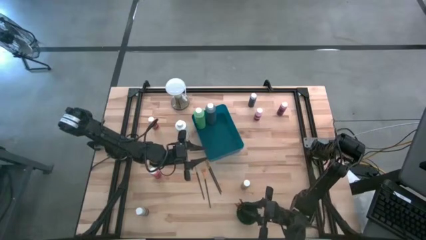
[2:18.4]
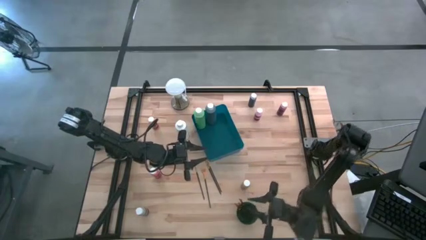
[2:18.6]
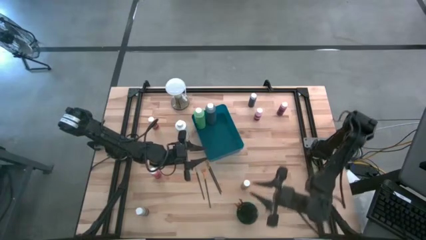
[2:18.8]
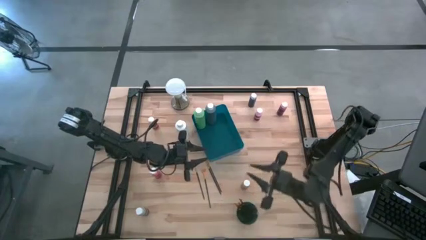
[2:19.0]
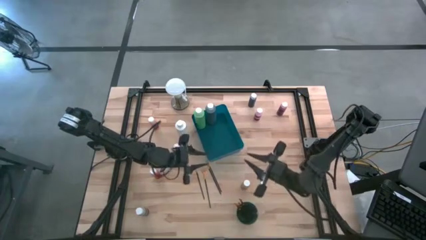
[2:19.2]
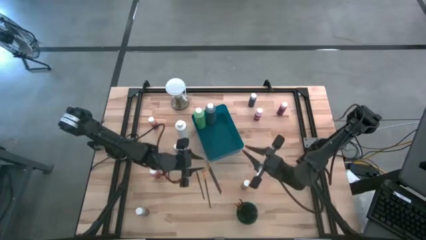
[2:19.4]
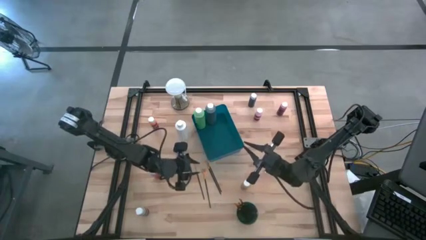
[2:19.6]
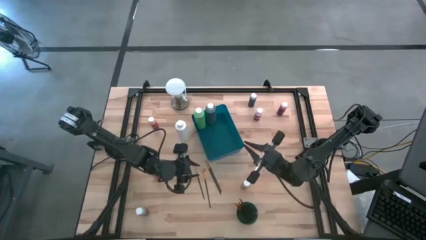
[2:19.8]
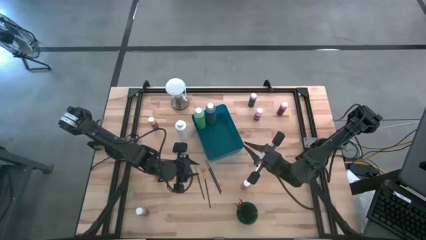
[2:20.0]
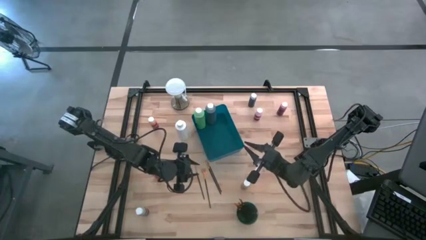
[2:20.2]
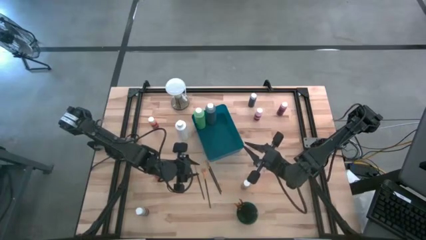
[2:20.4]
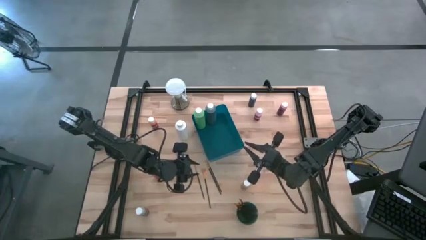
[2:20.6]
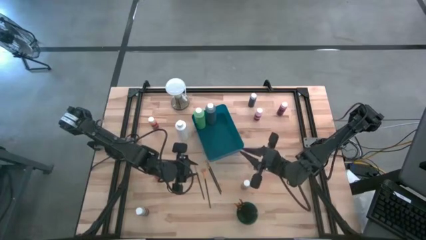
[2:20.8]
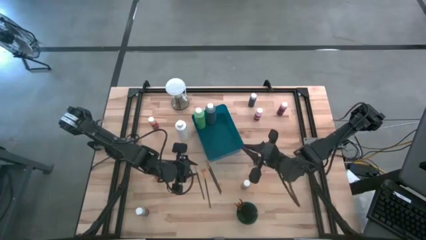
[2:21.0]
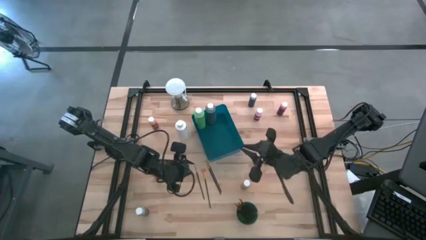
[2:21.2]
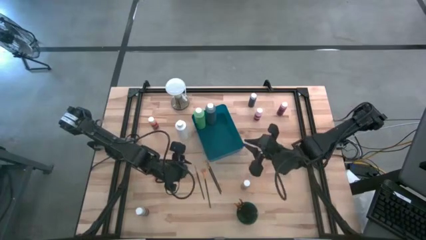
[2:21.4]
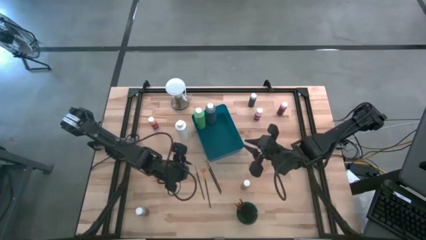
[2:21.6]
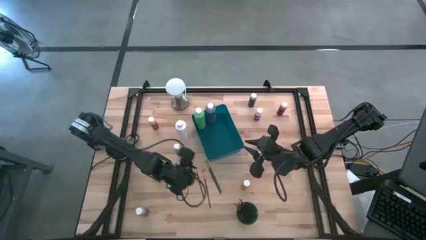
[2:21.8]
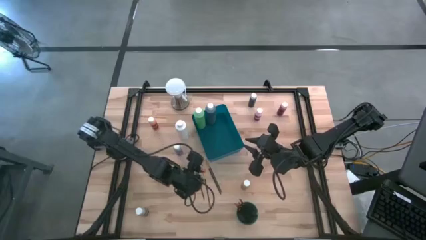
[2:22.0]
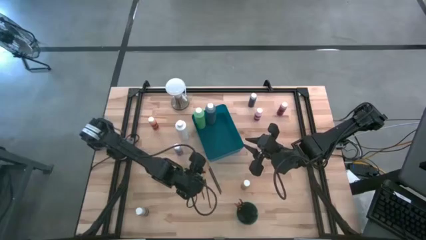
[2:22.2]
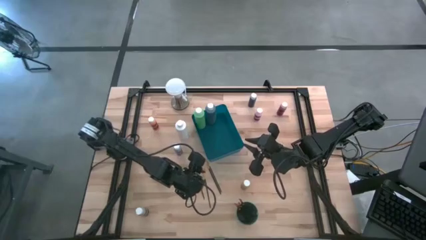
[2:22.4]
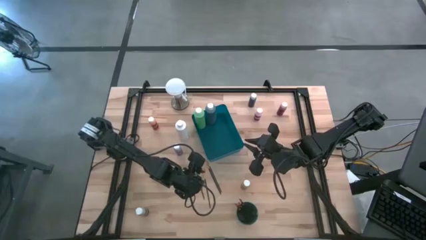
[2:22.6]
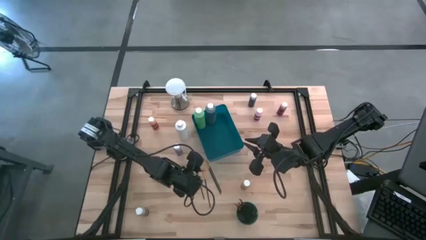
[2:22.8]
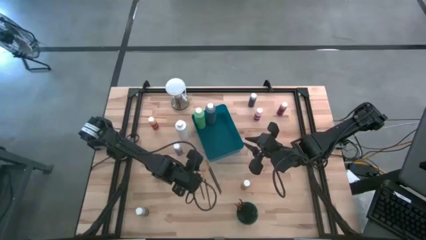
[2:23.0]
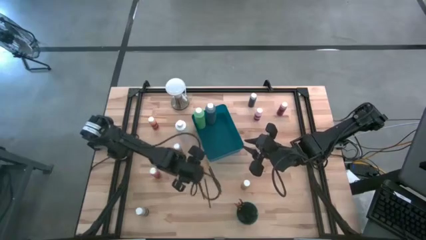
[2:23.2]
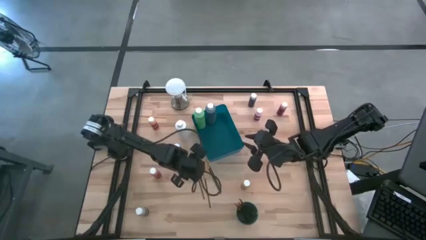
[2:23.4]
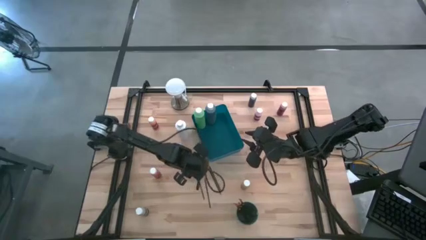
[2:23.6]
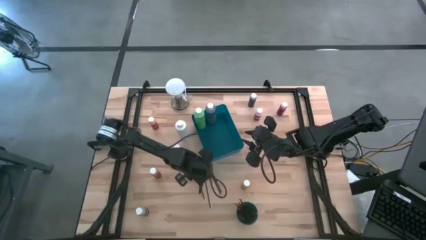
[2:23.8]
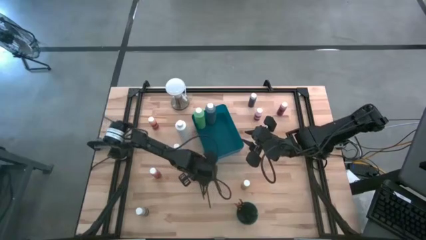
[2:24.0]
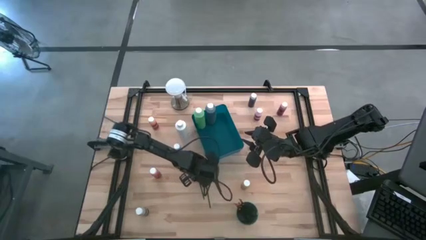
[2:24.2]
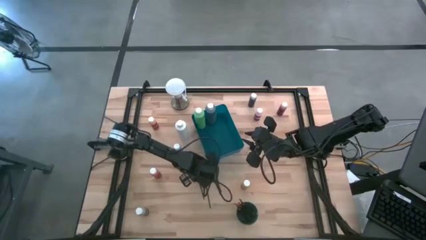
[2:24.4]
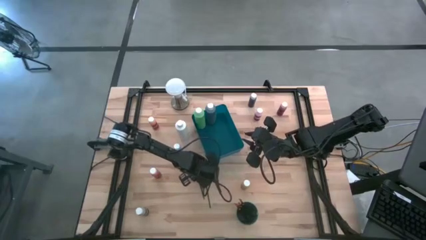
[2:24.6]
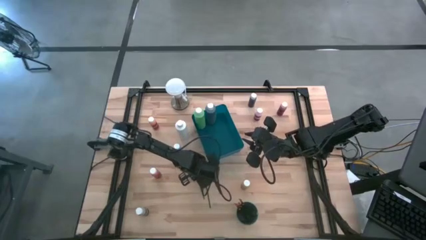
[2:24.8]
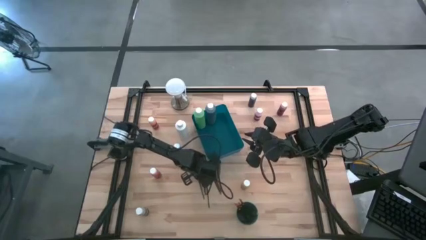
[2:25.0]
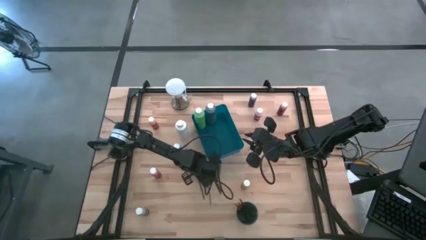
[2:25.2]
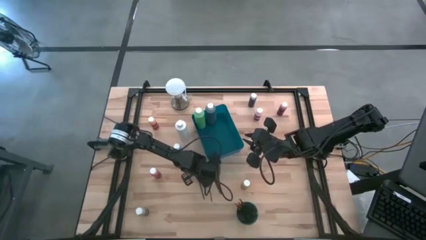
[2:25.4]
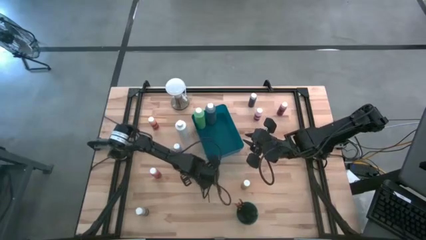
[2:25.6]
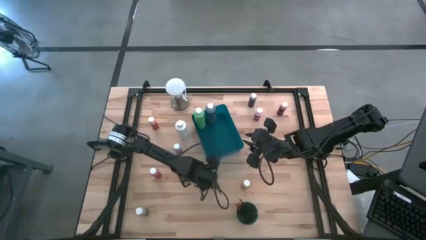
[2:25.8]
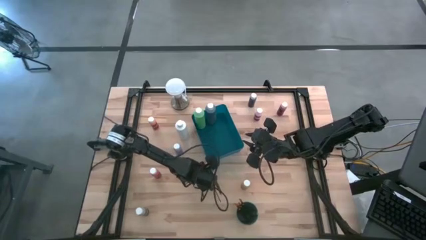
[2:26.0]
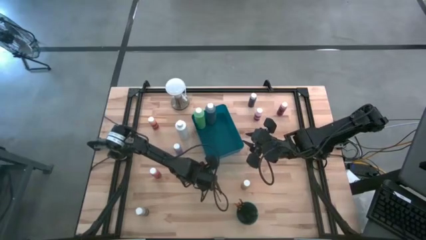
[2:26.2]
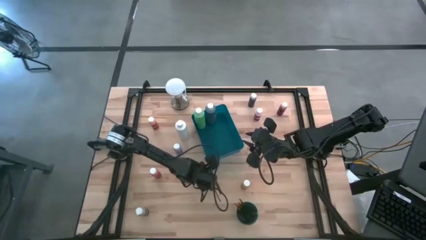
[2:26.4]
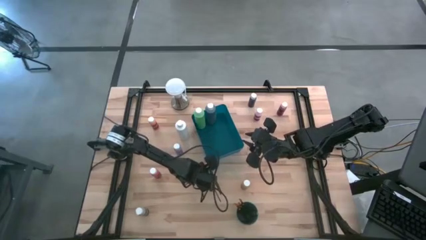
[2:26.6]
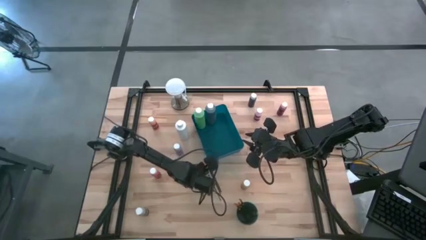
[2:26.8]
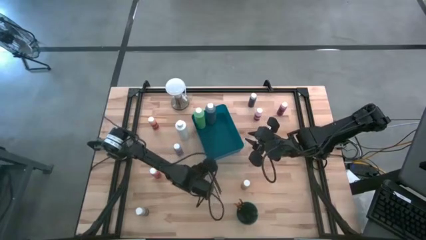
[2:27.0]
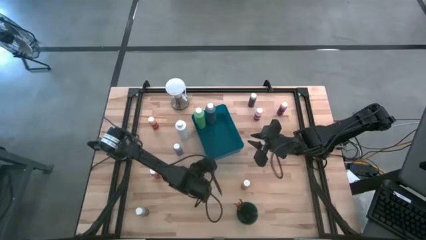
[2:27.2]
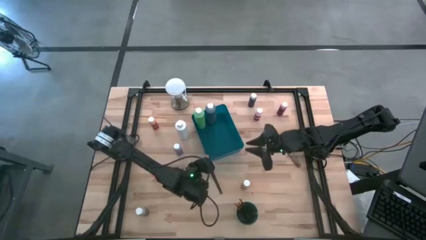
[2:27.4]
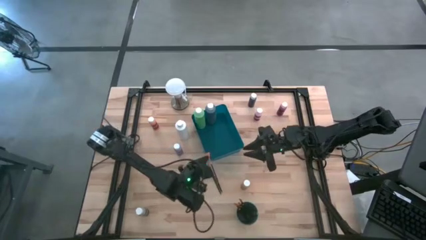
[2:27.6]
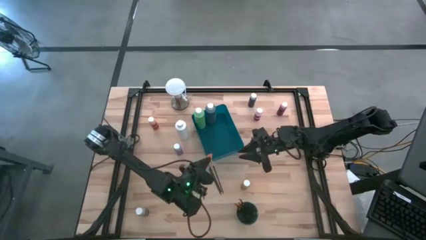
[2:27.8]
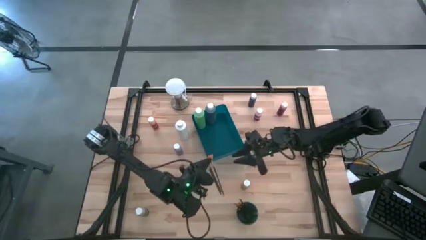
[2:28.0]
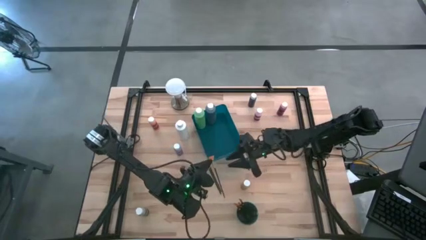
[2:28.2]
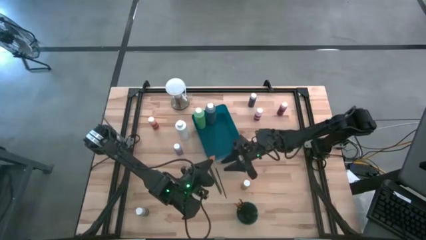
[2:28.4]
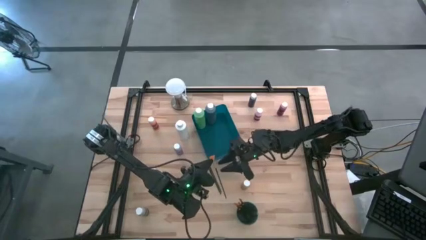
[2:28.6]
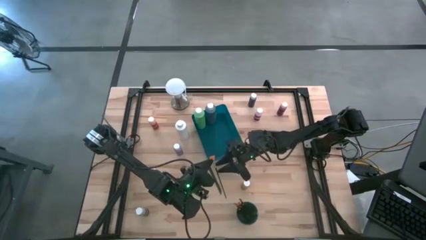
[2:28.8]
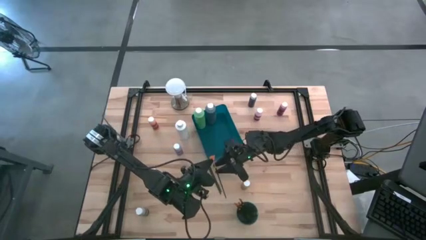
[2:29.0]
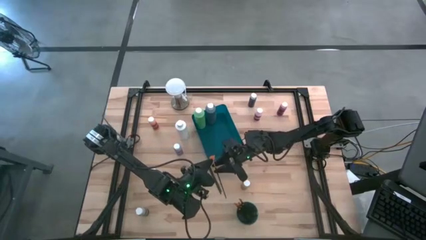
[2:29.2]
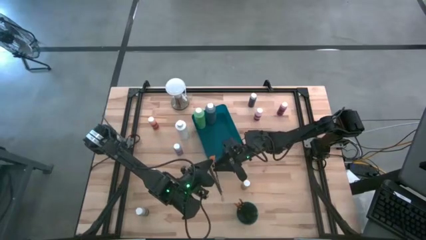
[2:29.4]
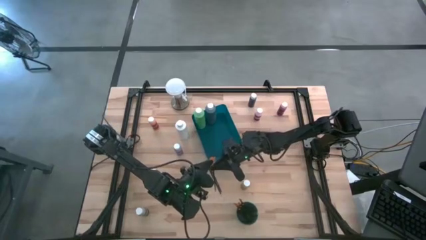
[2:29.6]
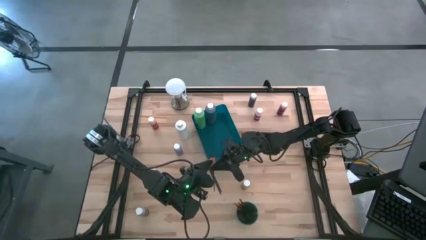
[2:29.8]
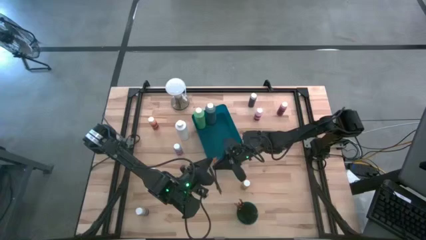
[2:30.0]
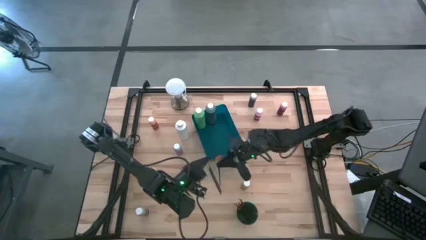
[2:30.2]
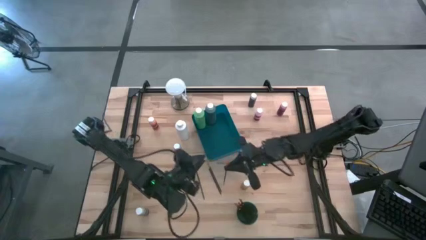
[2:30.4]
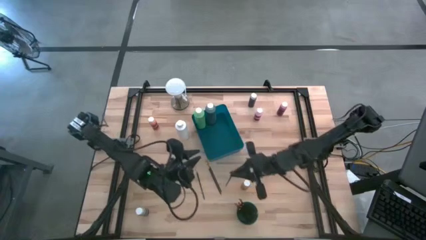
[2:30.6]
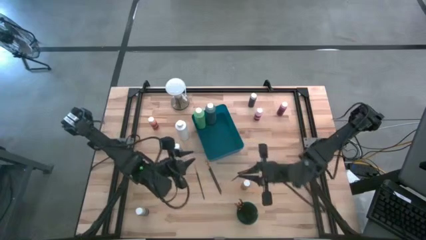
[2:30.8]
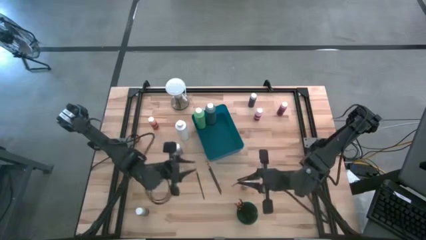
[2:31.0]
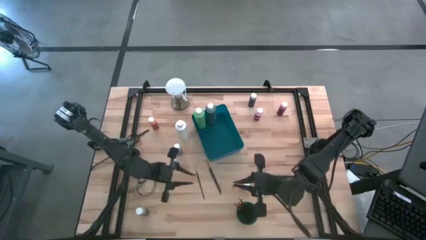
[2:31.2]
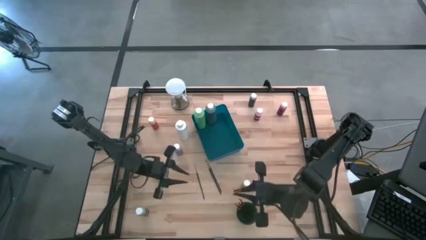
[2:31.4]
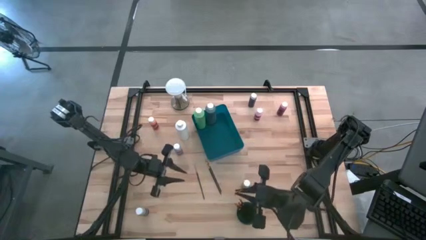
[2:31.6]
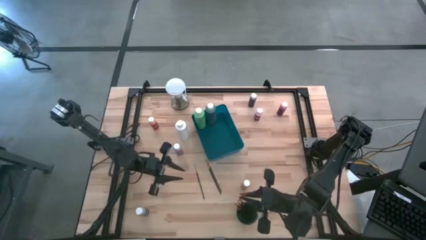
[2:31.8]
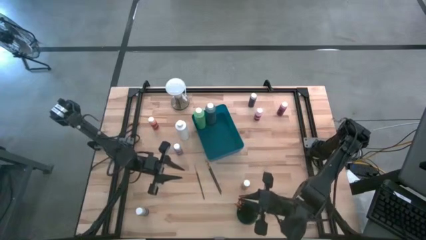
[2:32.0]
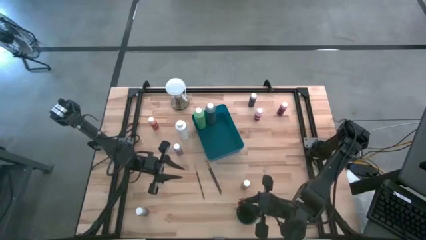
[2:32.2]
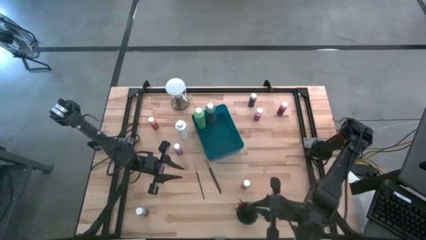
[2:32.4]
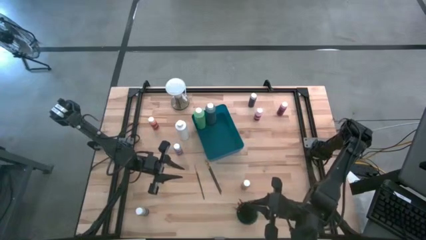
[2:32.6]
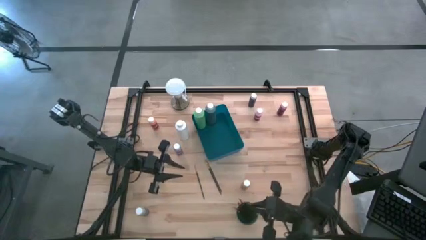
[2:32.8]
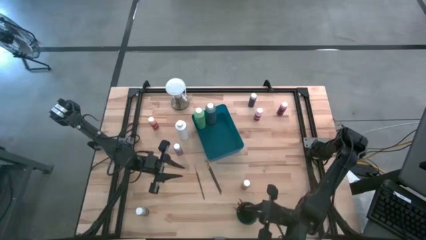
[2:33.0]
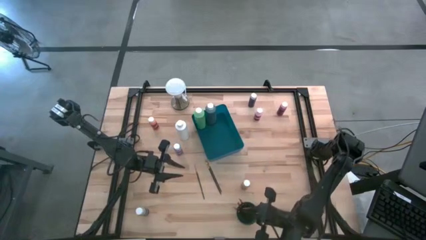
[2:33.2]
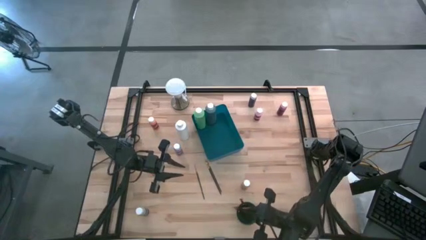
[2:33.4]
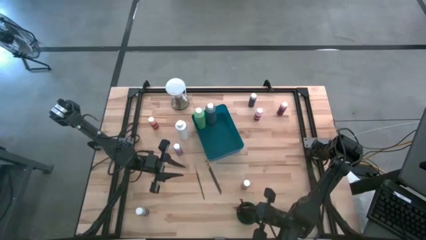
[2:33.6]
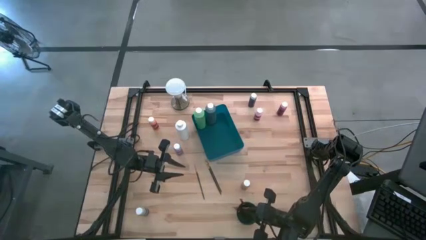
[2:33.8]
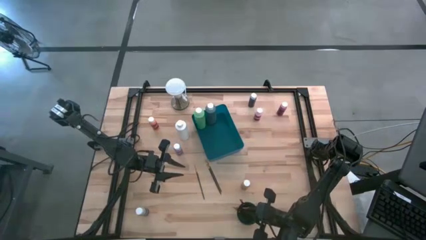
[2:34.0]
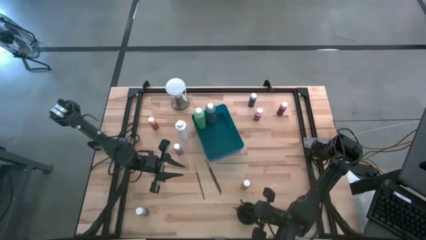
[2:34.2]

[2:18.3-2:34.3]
Task: Pick & Place Paint Supplies
Put the gold paint brush into the green cup
